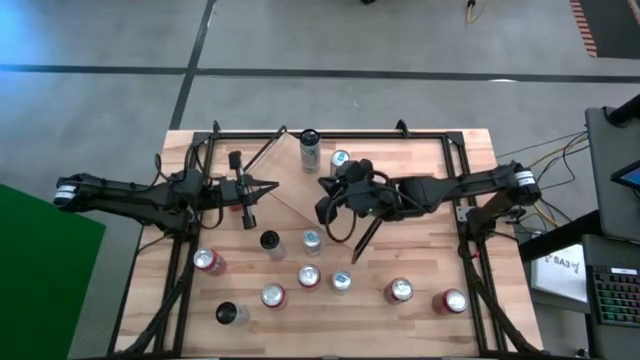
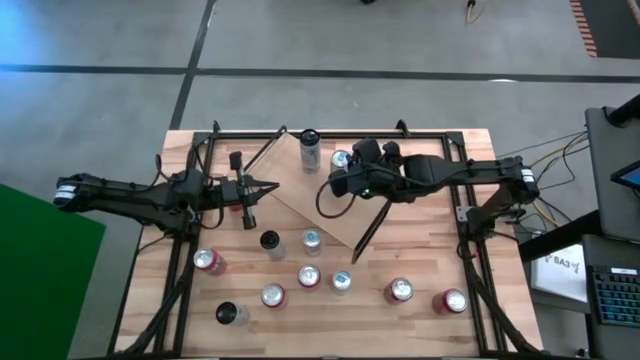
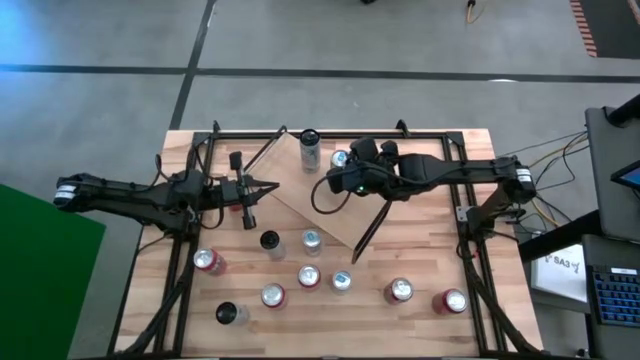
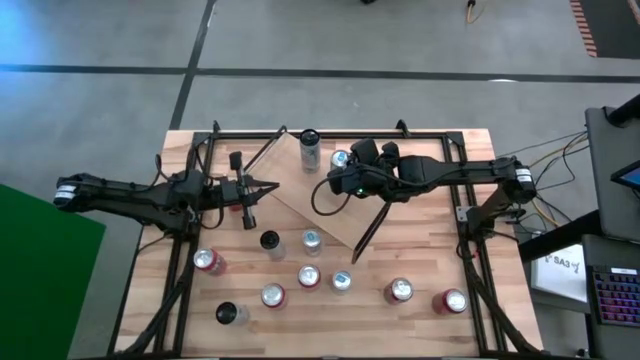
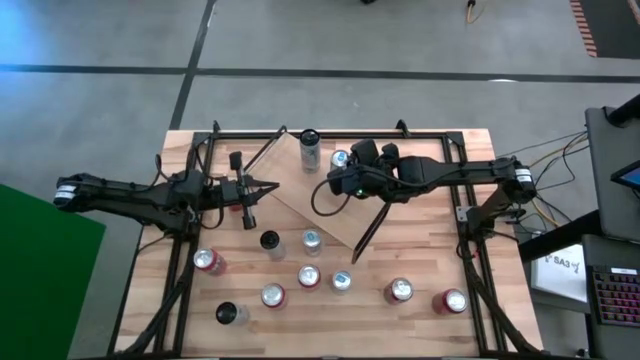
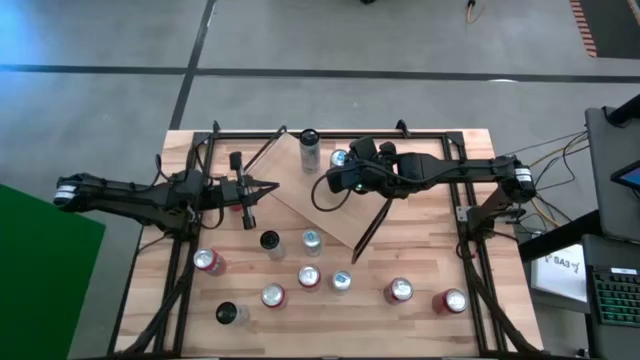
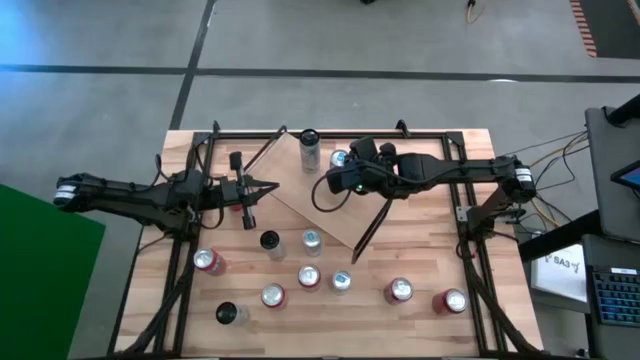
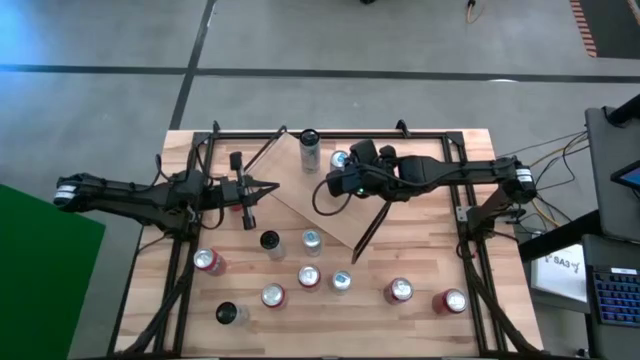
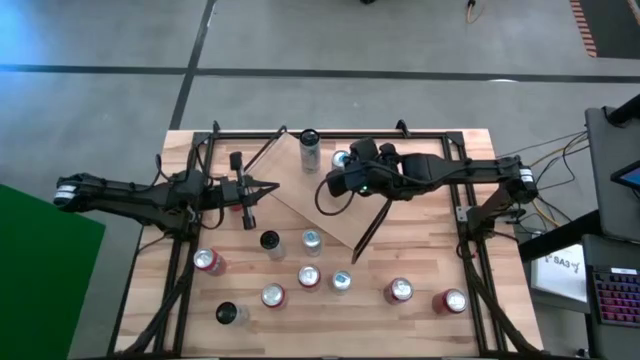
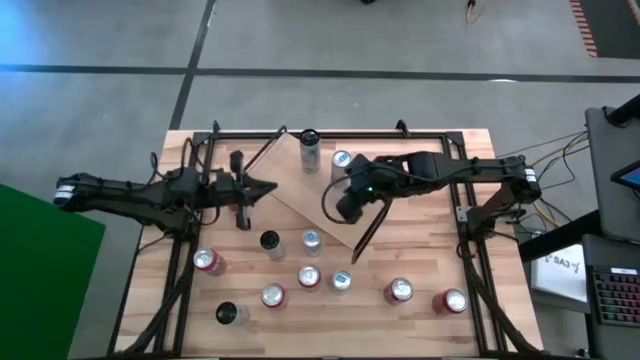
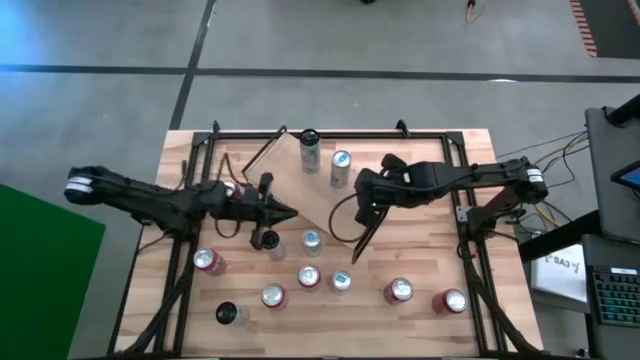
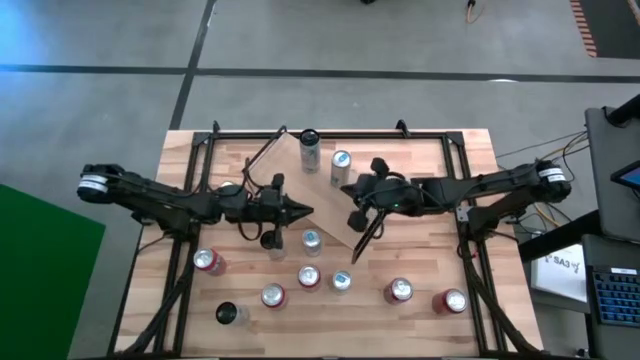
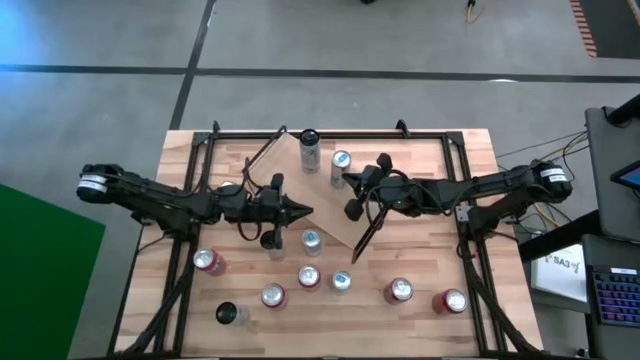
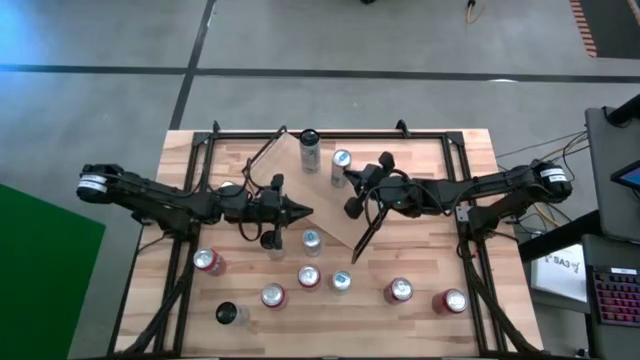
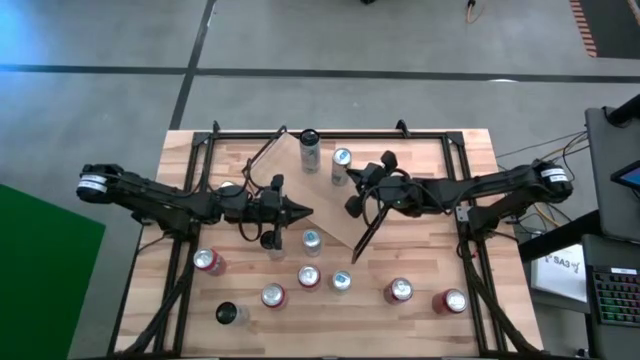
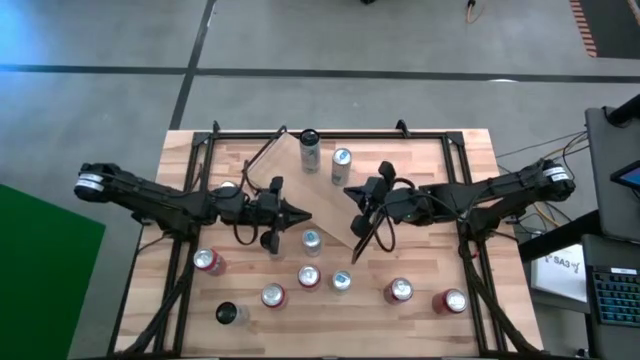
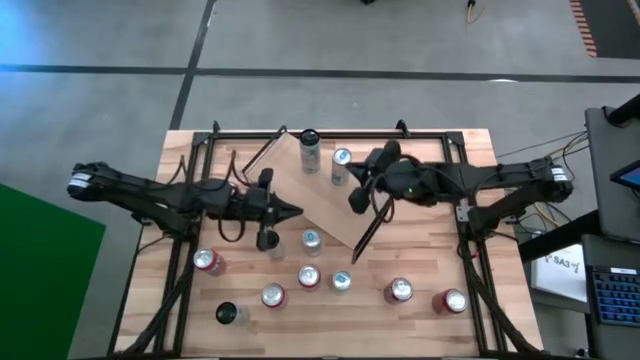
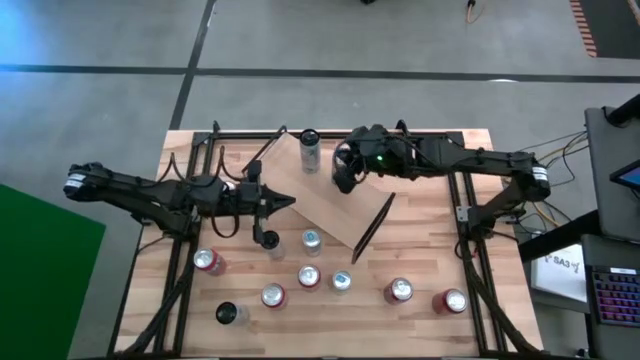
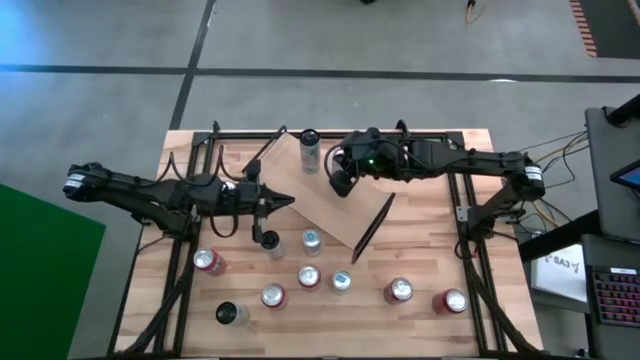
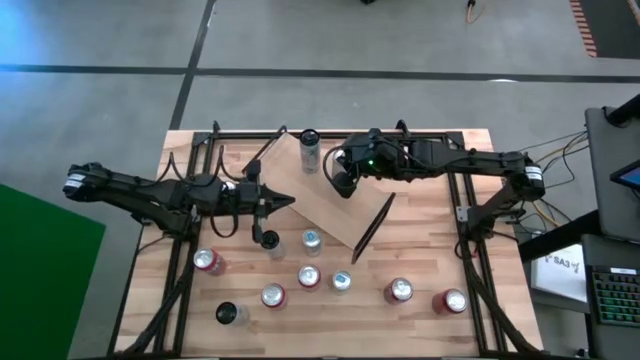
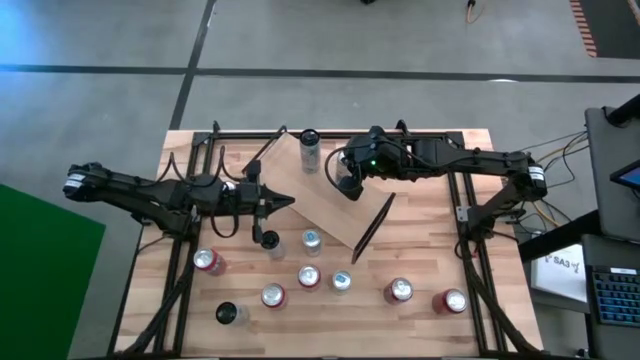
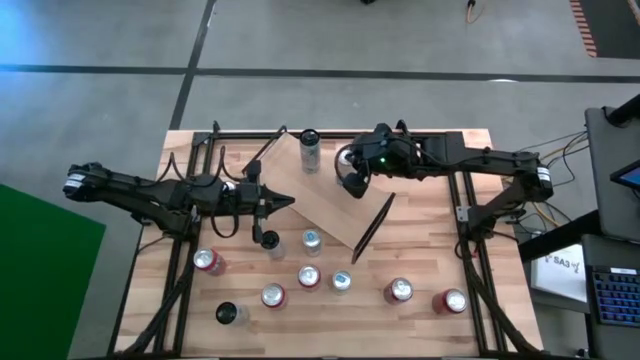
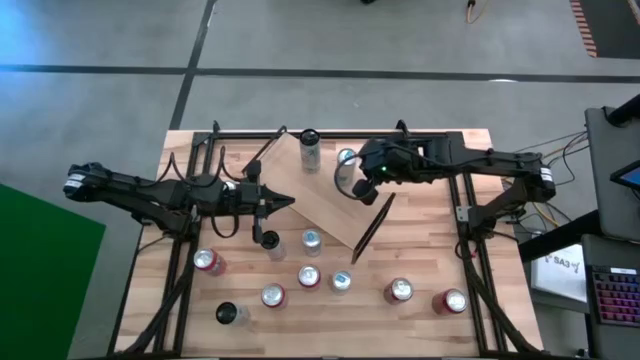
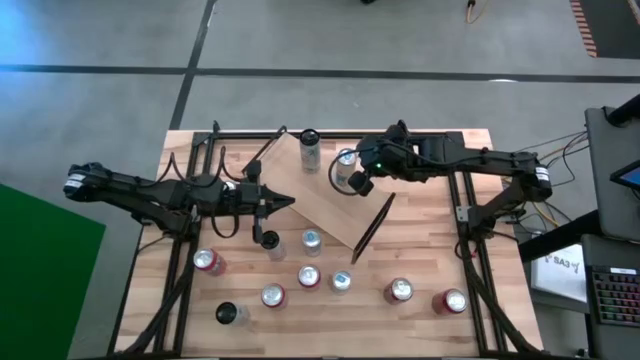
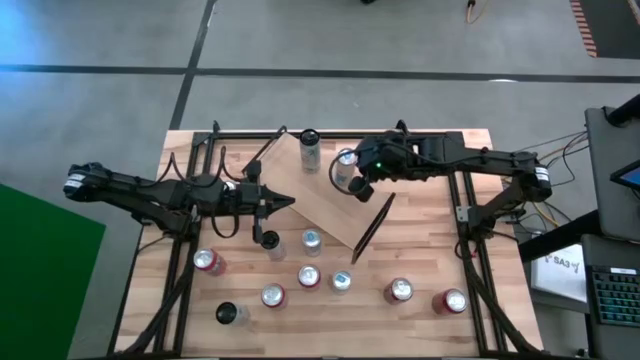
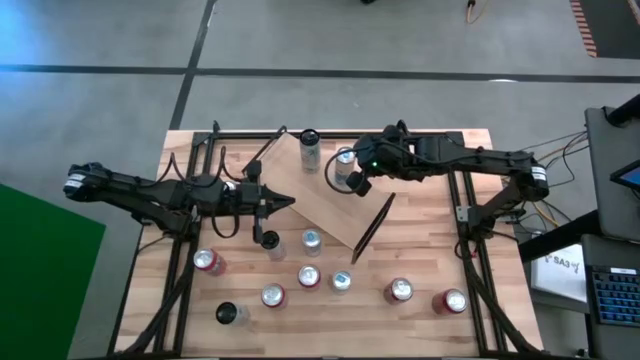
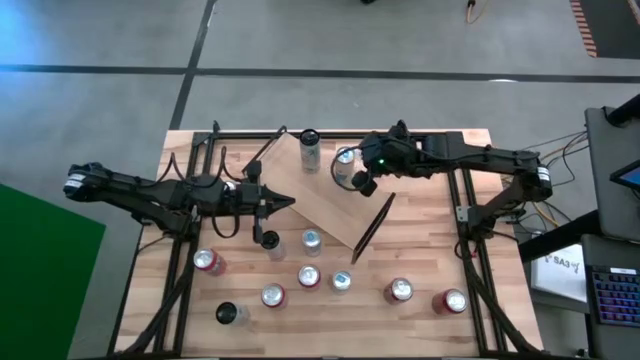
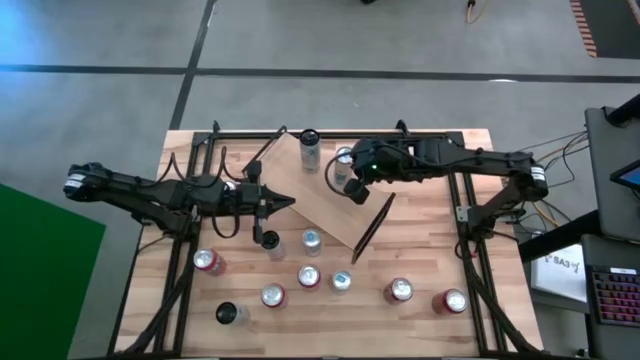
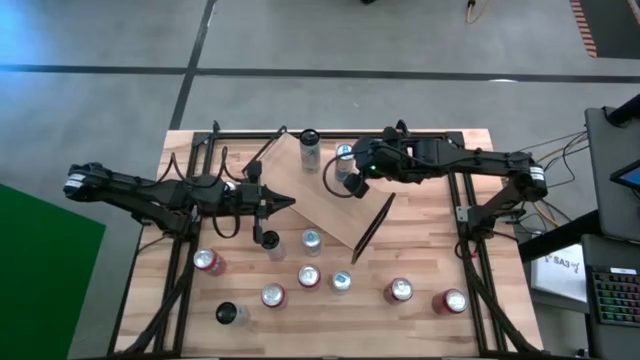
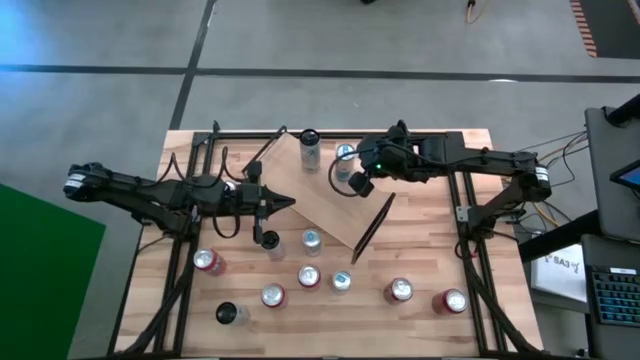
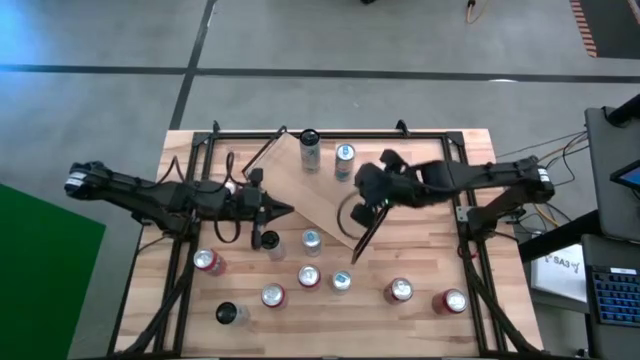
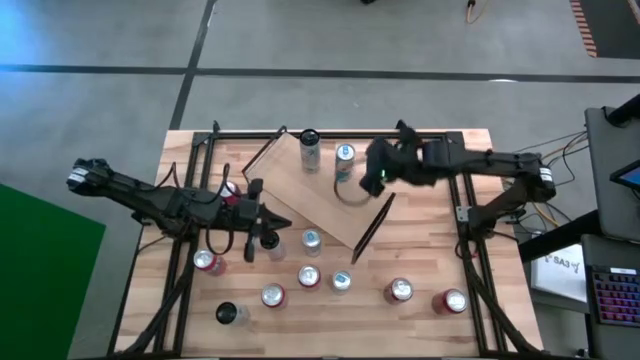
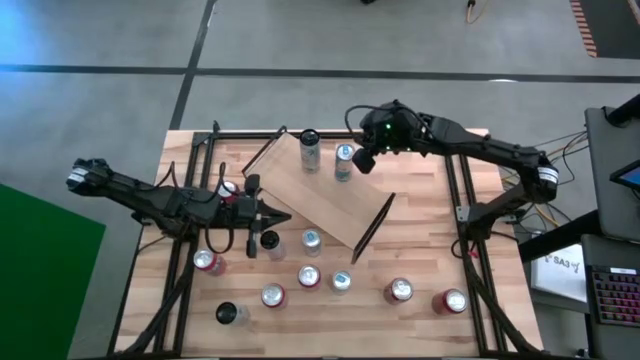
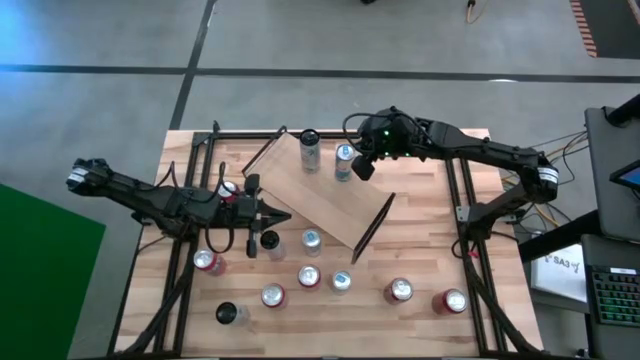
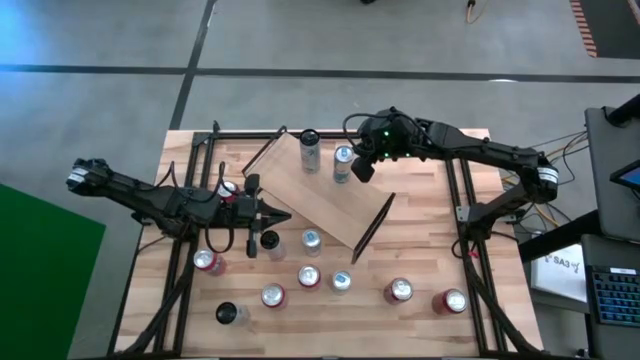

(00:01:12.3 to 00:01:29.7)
Task: Place canned beverage on shelf
Put the silver/blue soda can on the shelf

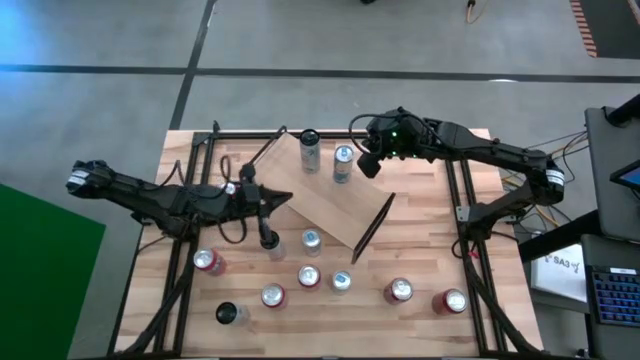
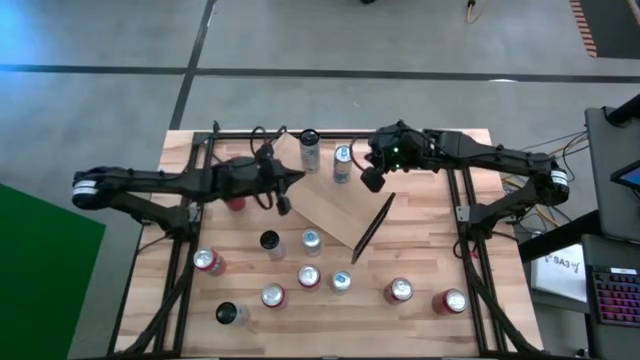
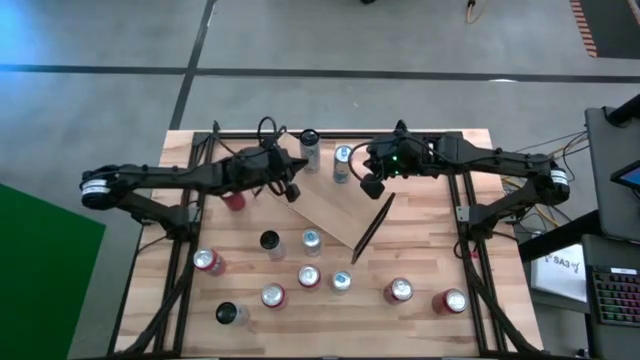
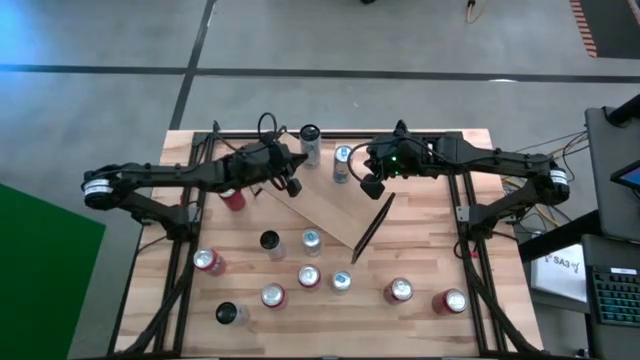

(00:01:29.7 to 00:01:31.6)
Adjust the white and pink soda can on the shelf

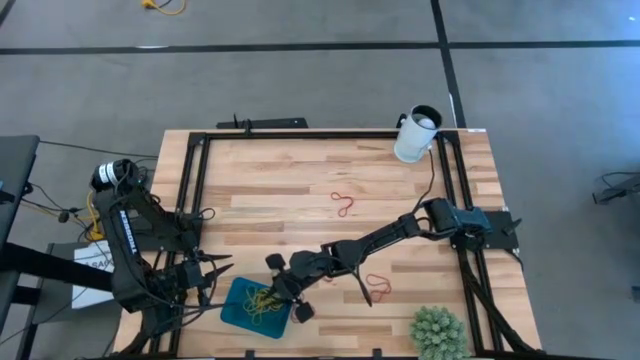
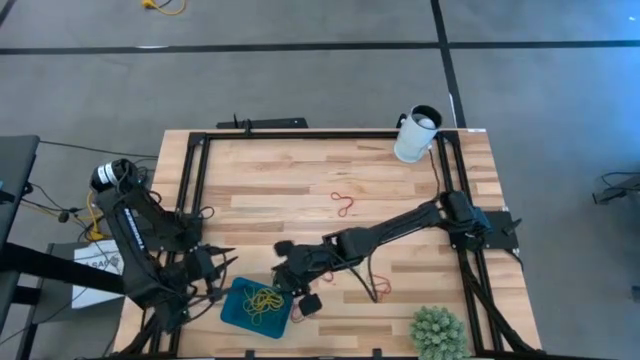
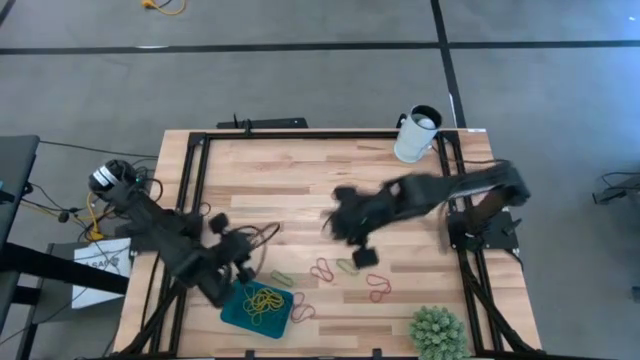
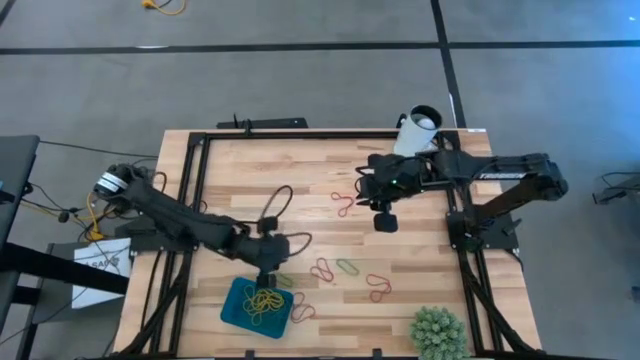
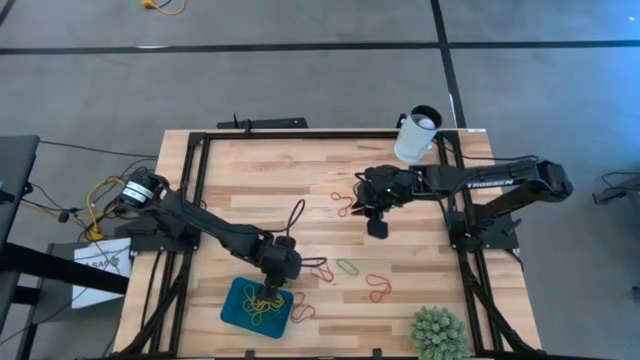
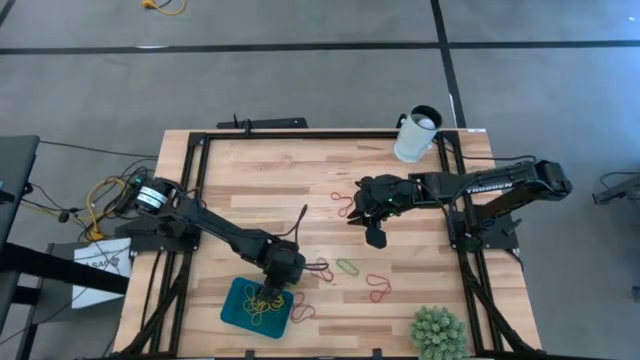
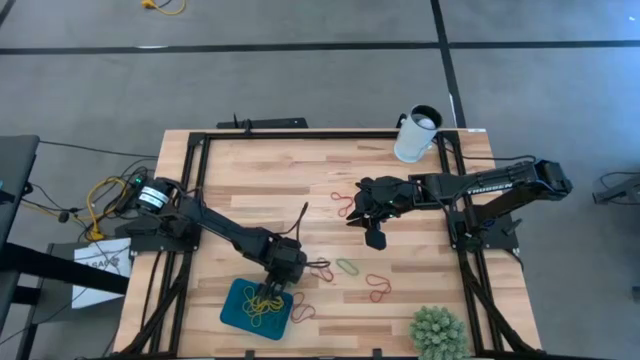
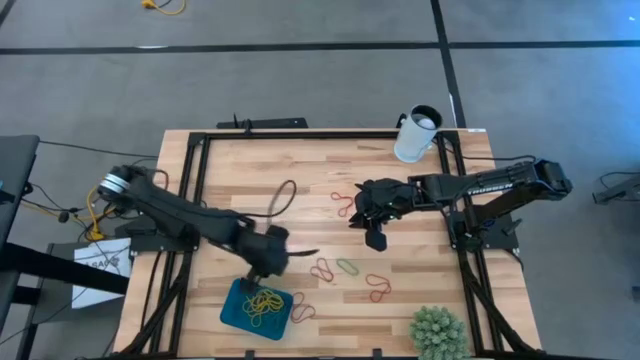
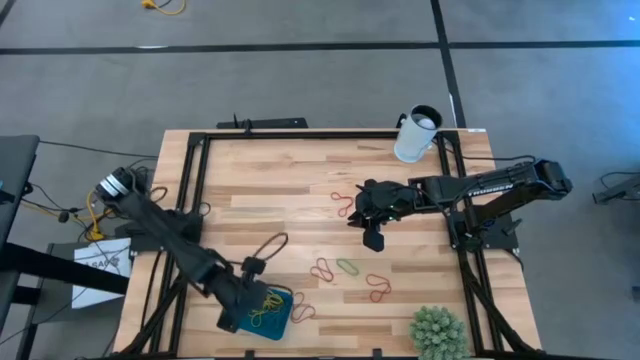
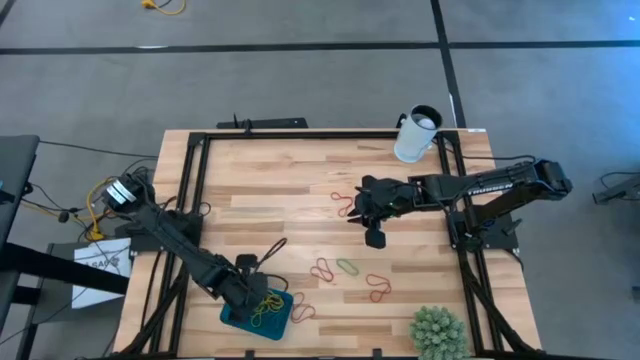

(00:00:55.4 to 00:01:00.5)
Task: Pick and place items into bin
Put the green rubber band into the blue bin
